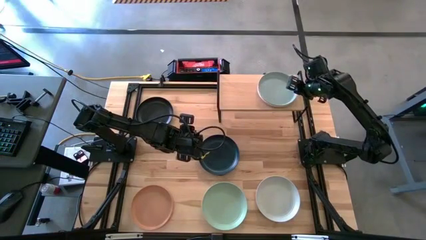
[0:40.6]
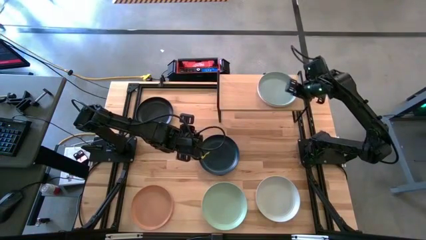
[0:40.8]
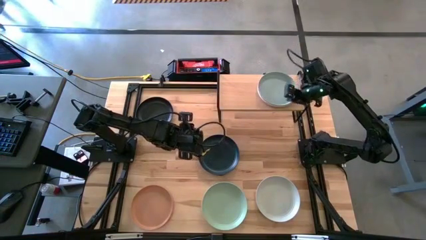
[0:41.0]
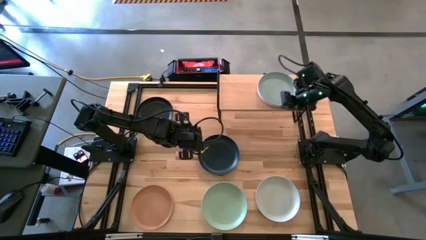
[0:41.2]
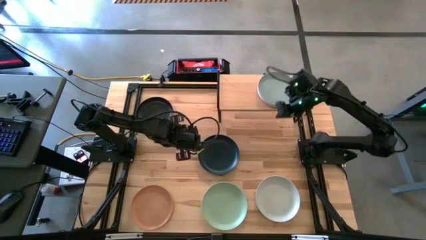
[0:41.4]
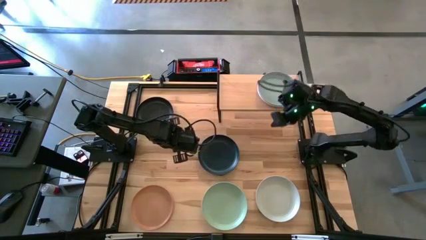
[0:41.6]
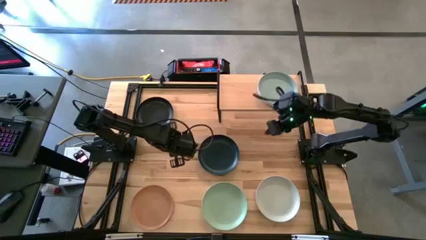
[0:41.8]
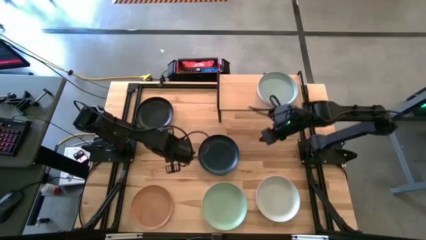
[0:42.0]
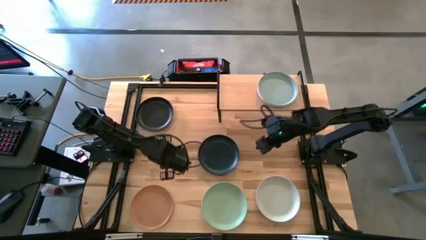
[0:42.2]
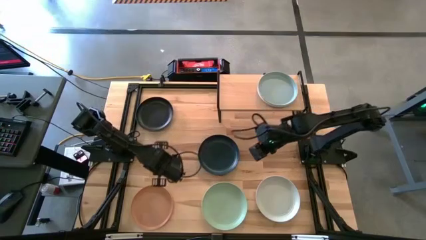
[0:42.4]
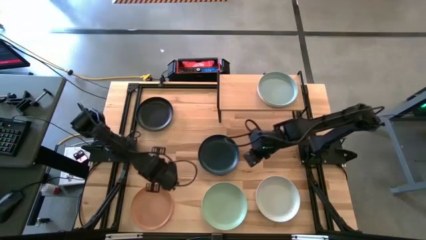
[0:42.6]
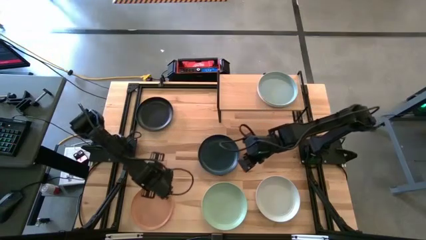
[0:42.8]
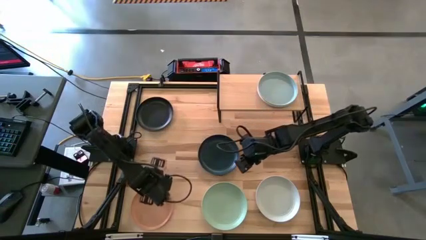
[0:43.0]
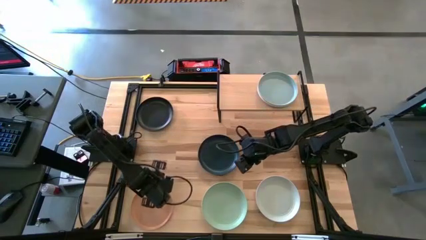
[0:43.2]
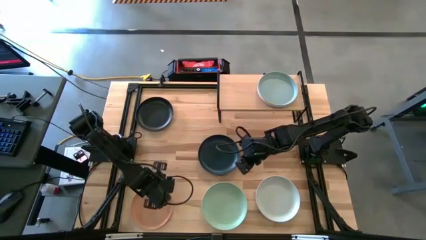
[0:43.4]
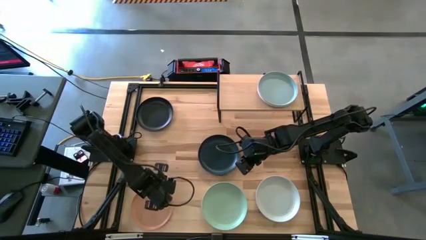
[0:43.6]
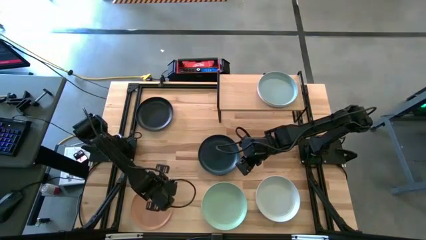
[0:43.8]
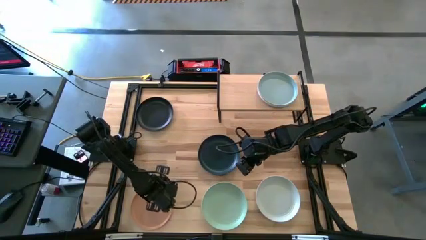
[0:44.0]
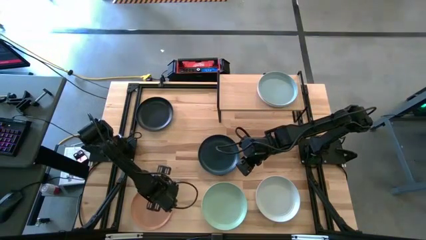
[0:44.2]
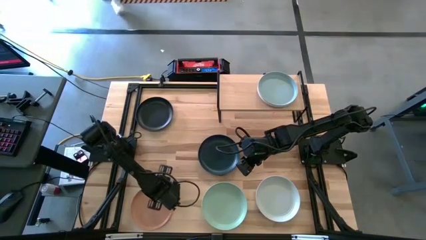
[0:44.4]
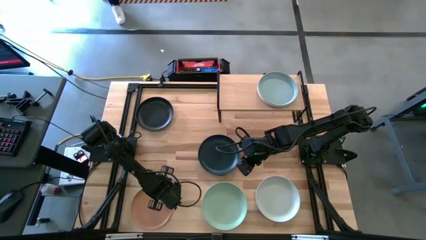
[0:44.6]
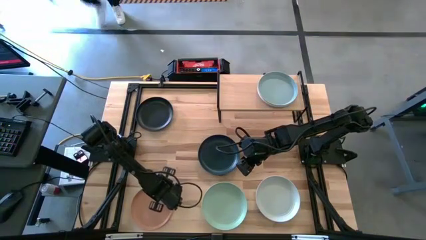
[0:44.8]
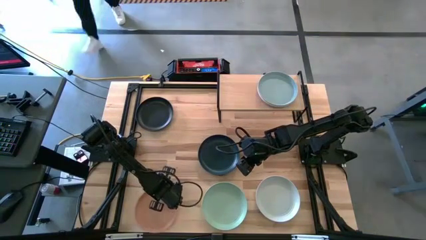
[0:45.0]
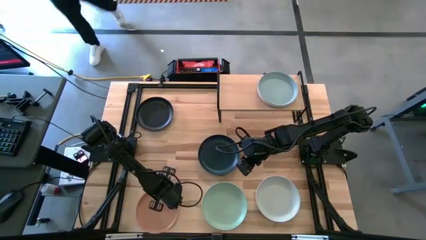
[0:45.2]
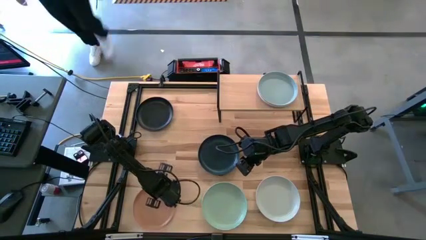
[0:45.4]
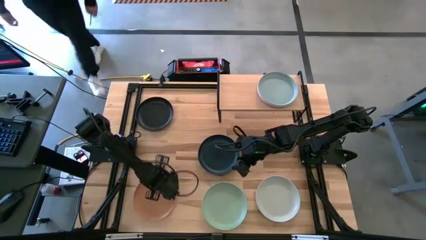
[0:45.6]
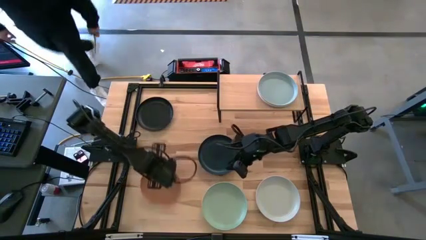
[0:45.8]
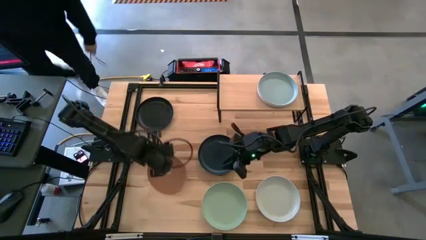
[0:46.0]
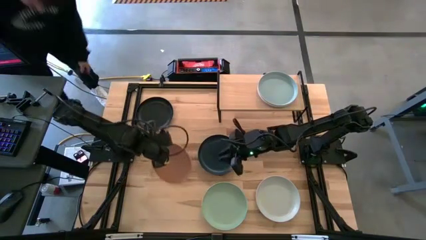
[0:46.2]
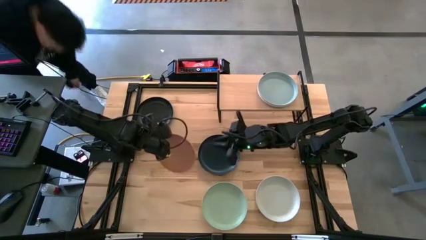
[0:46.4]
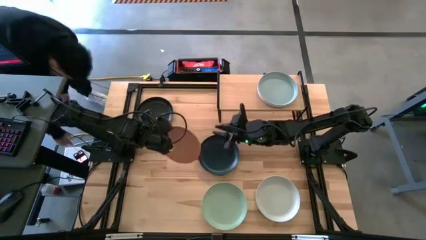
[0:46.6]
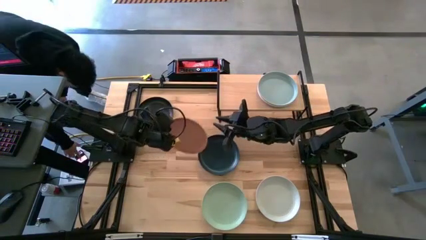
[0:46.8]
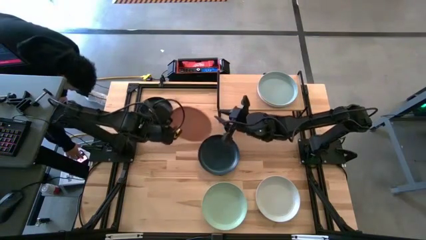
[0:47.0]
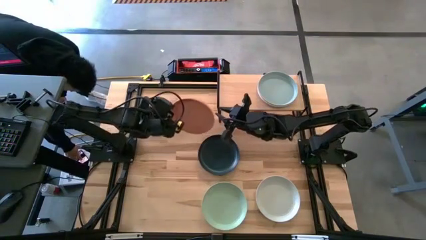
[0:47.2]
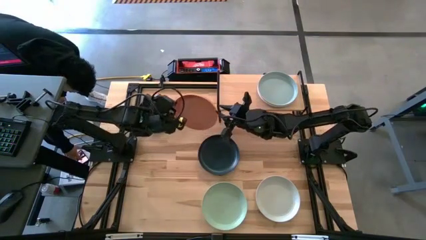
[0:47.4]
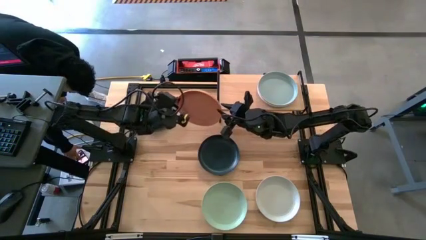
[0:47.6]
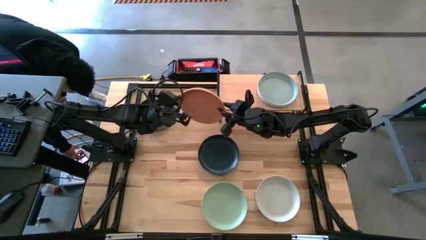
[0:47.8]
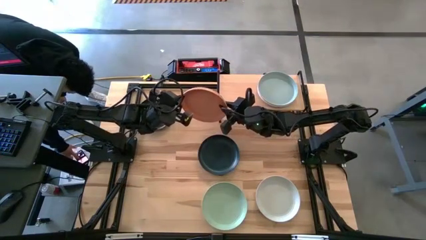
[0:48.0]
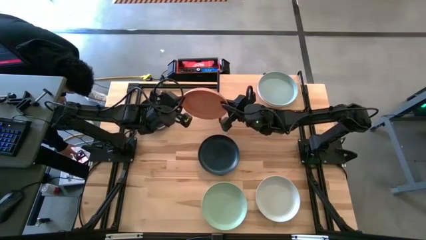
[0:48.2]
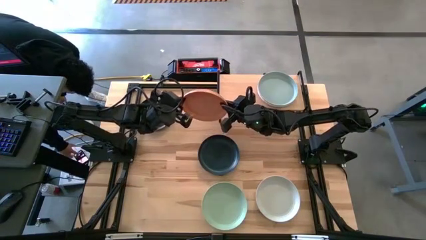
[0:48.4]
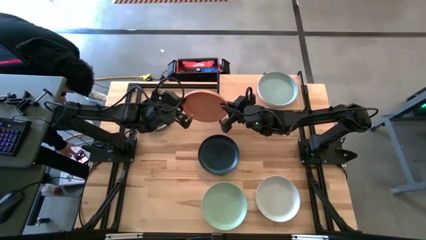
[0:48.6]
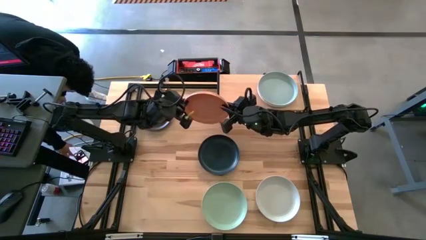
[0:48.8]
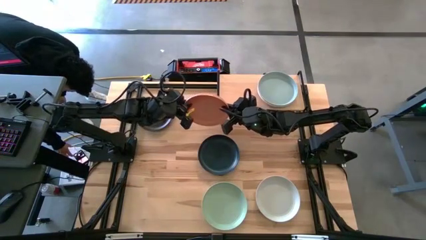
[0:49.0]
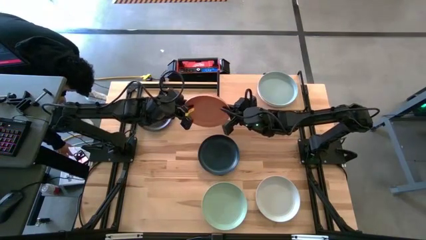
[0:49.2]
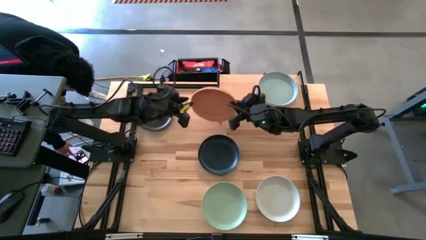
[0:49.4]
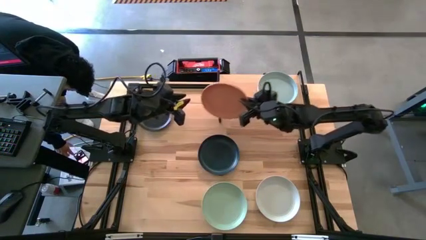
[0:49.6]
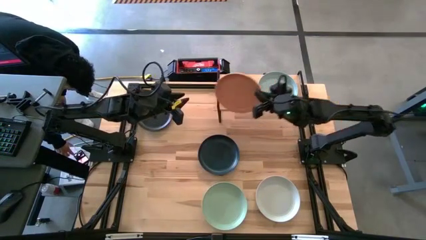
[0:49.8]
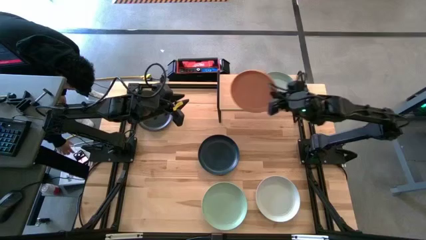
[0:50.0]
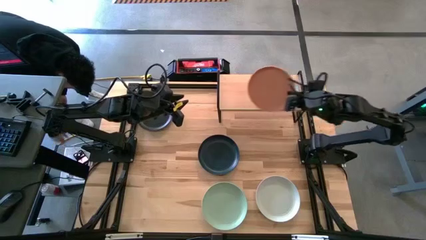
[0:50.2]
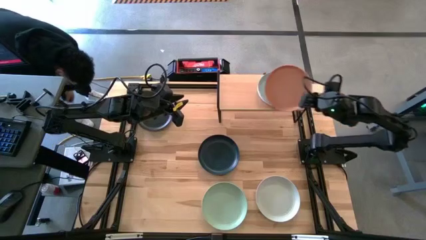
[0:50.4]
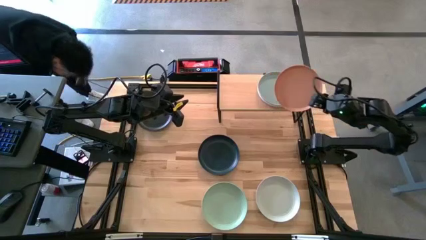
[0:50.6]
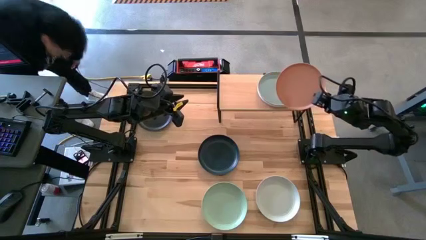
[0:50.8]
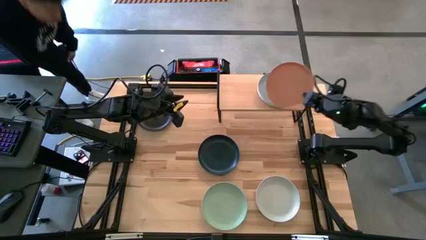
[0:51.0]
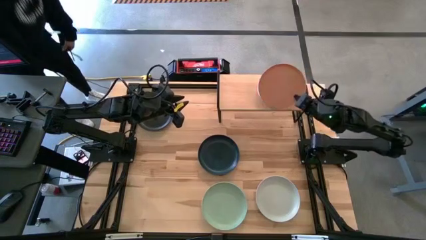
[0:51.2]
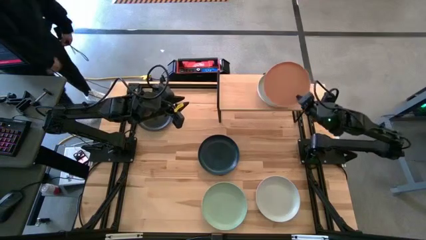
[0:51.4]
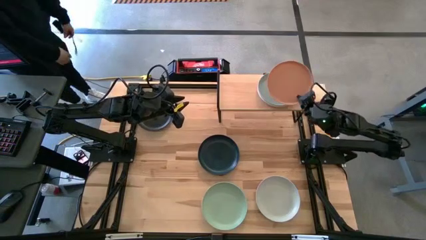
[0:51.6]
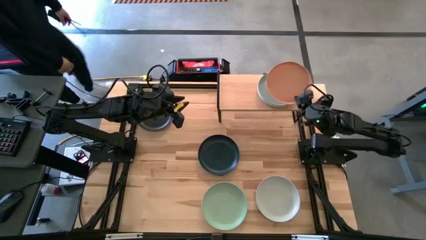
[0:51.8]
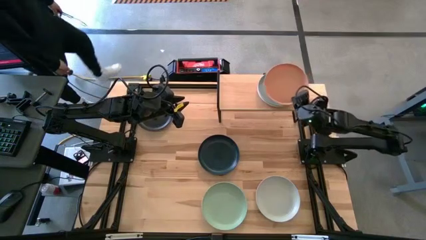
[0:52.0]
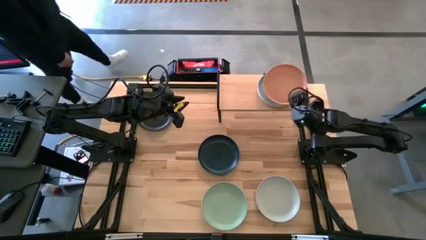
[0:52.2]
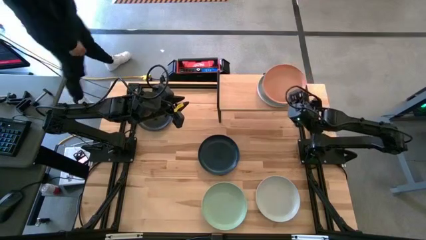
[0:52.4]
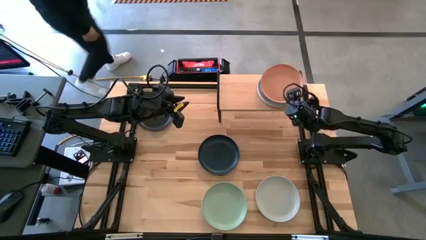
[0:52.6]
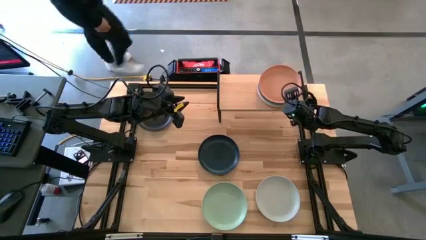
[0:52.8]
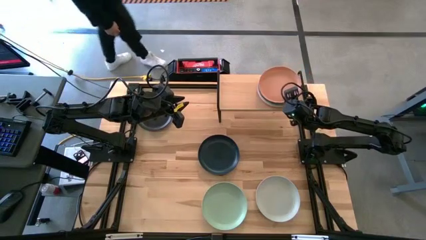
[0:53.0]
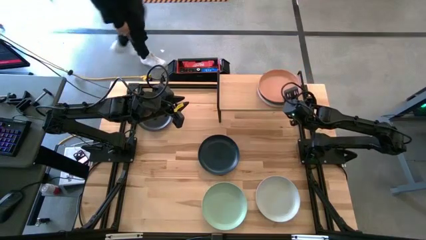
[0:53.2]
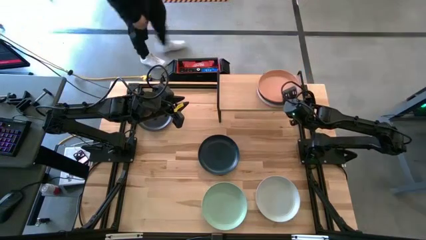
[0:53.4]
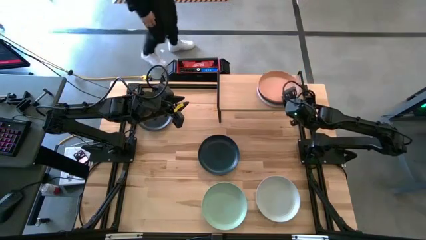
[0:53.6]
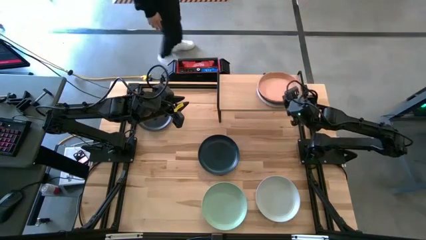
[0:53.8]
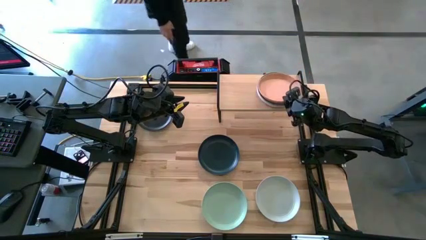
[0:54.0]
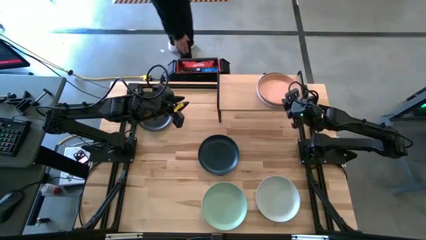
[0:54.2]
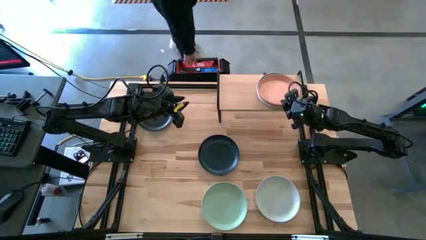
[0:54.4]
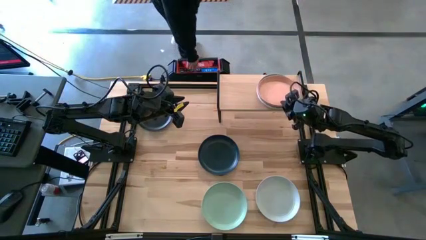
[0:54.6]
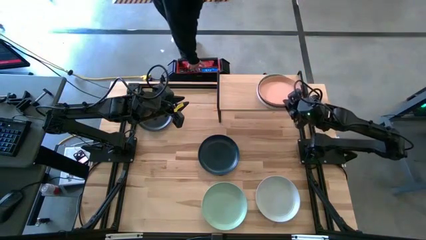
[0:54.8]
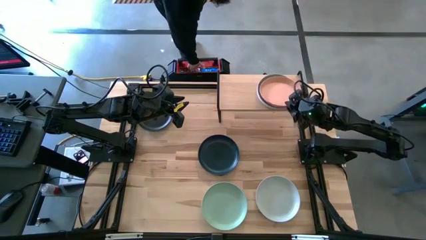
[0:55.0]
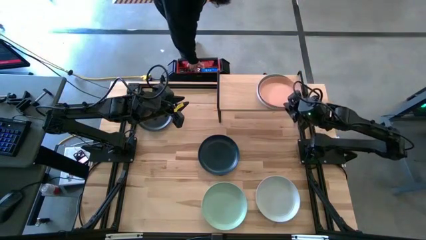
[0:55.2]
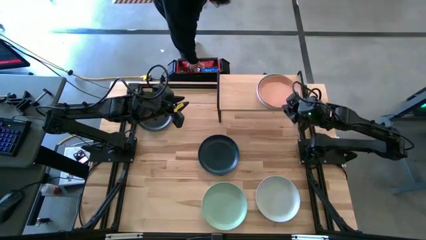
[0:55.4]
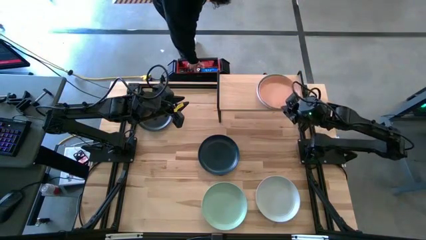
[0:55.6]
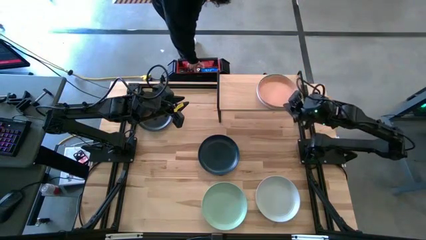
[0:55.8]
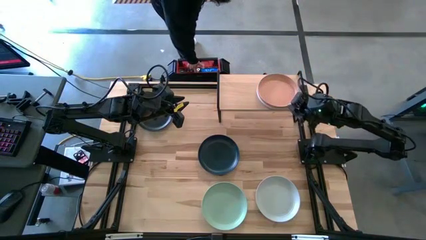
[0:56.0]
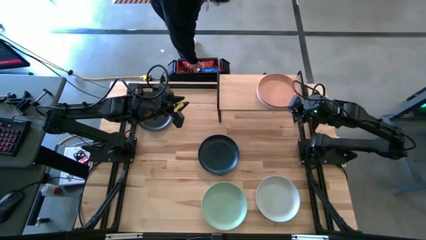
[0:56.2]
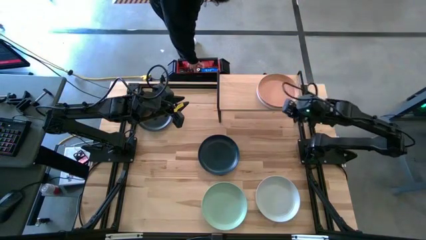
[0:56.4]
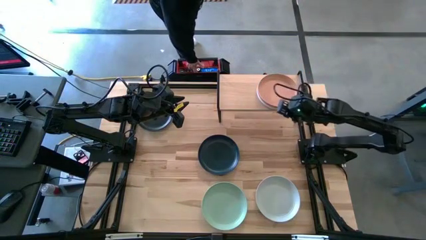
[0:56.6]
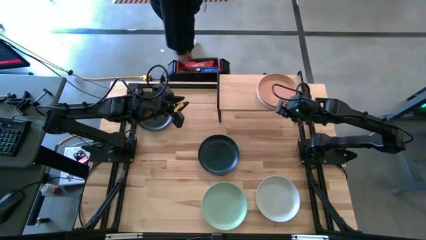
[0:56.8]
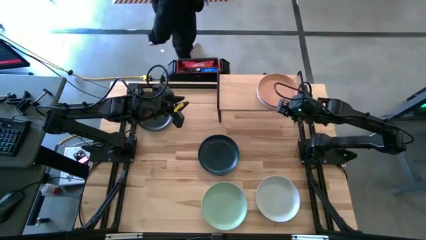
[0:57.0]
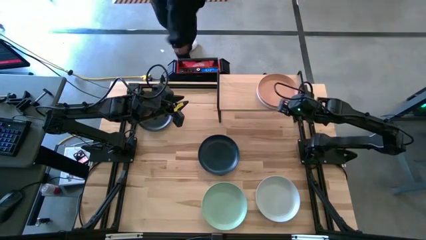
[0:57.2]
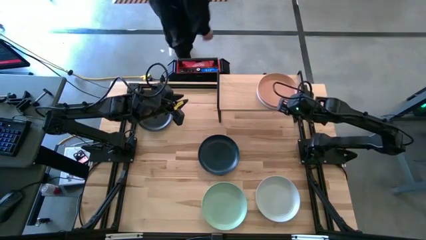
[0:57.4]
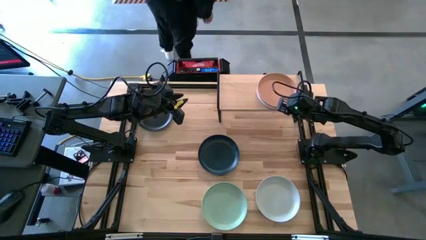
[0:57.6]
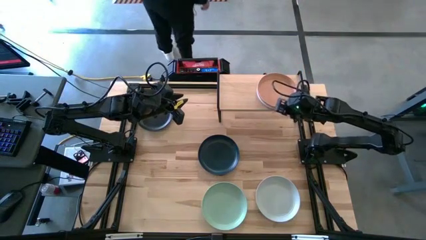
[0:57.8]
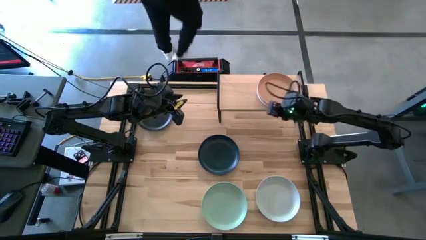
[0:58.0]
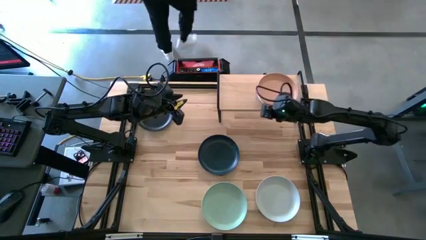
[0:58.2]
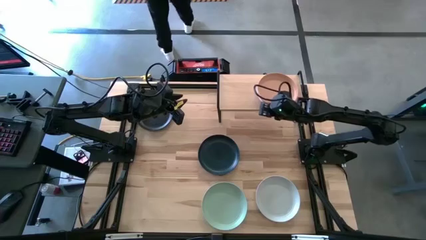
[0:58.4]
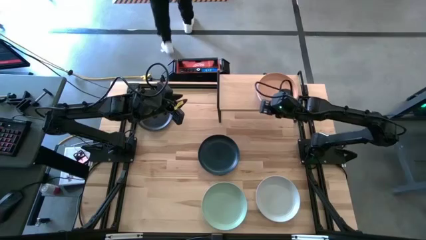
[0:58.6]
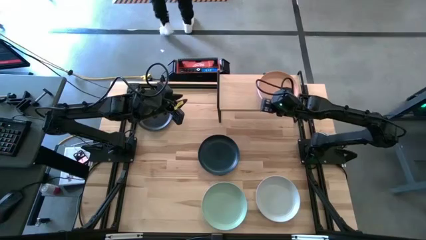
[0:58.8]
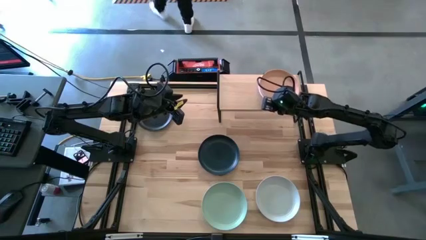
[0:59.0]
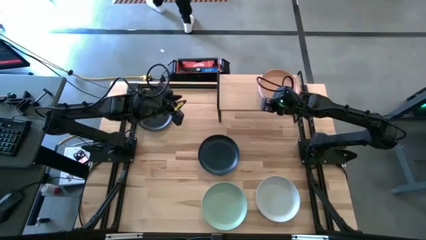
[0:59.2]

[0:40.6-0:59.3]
Task: Place and stack plates onto a shelf
Stack the brown plate on top of the blue plate on the shelf
